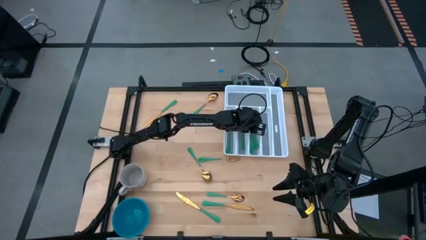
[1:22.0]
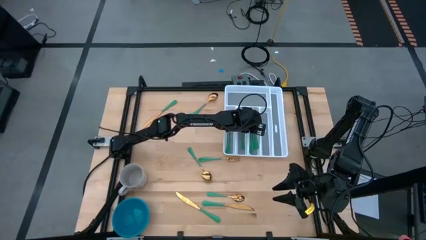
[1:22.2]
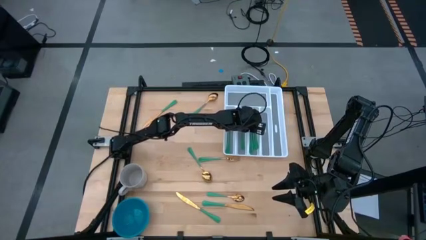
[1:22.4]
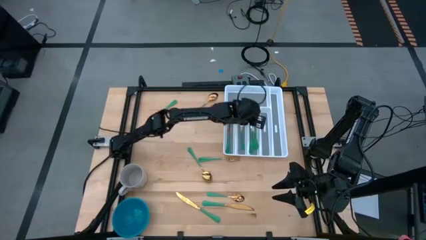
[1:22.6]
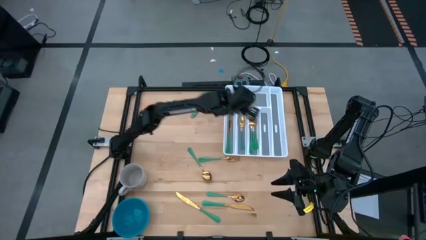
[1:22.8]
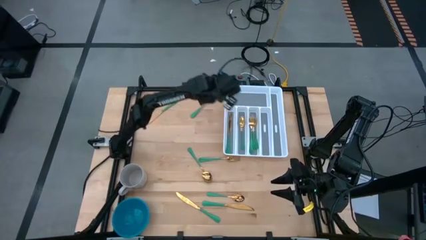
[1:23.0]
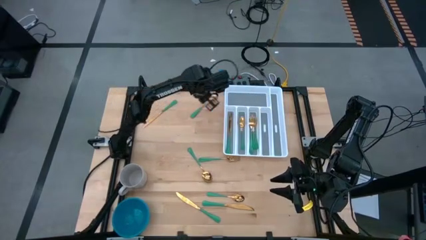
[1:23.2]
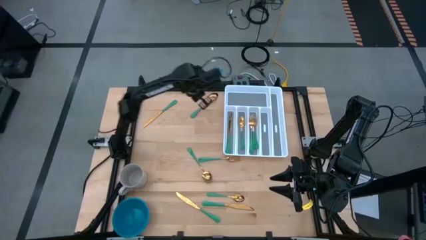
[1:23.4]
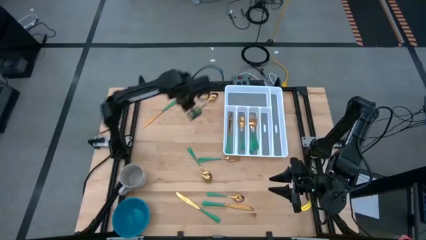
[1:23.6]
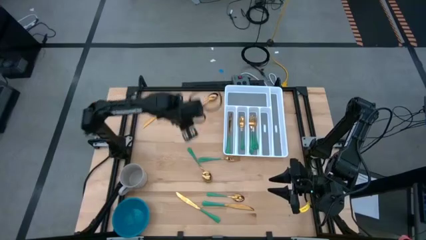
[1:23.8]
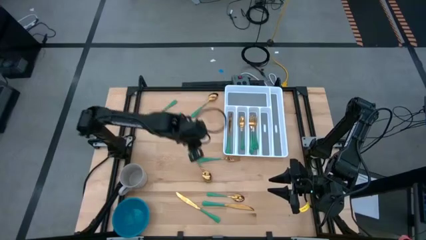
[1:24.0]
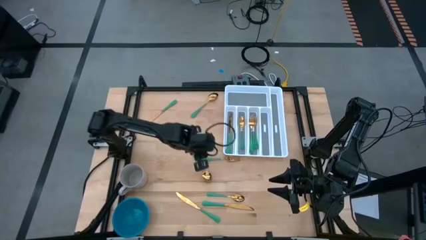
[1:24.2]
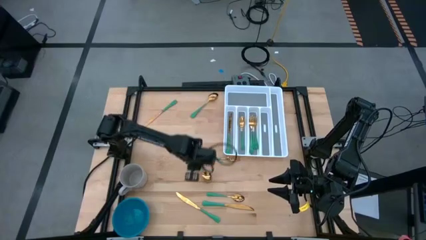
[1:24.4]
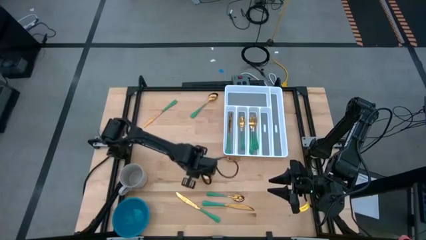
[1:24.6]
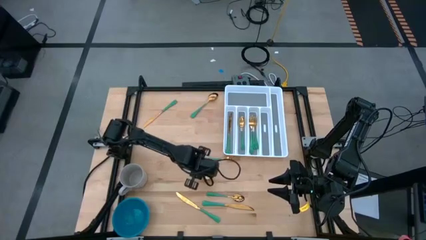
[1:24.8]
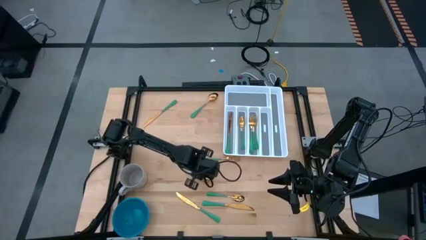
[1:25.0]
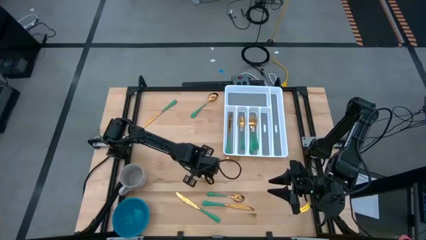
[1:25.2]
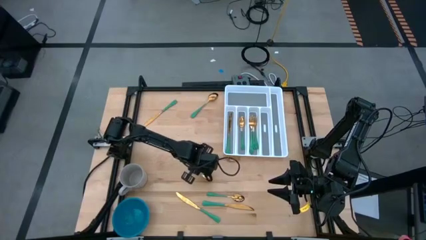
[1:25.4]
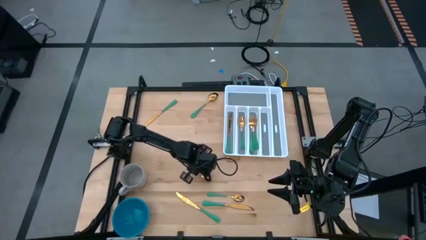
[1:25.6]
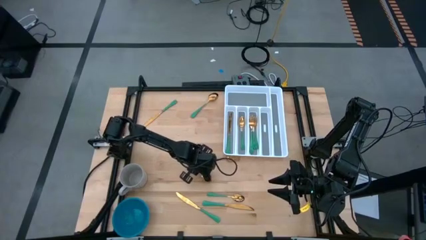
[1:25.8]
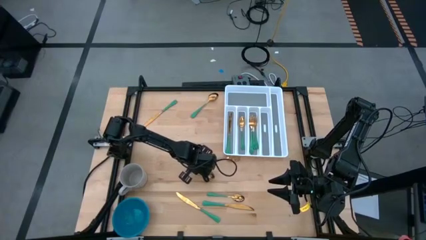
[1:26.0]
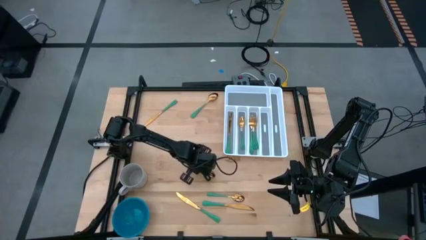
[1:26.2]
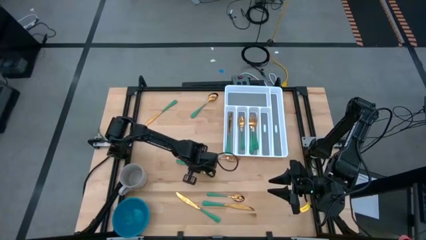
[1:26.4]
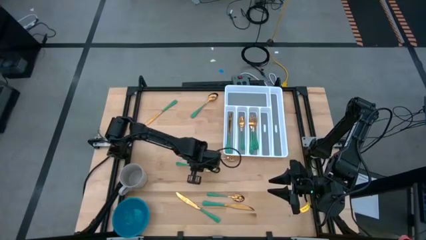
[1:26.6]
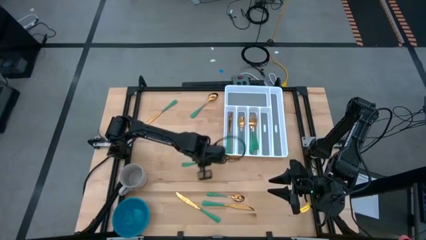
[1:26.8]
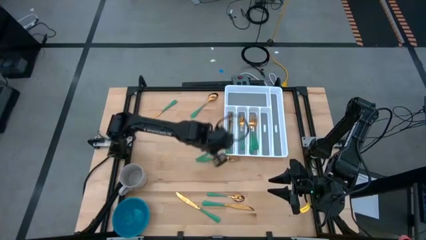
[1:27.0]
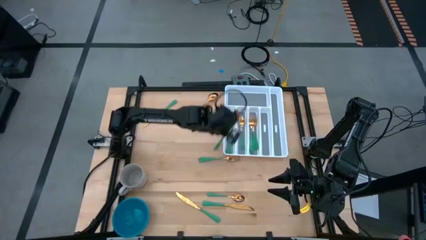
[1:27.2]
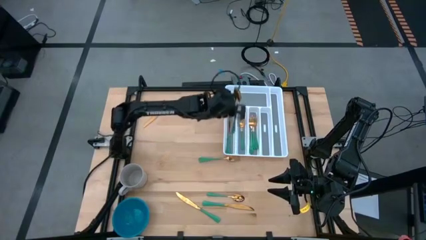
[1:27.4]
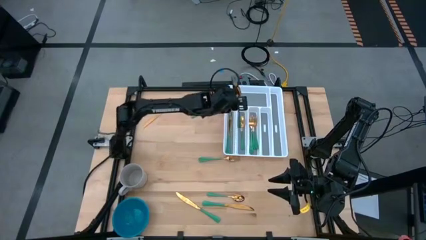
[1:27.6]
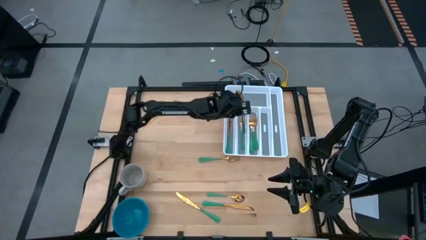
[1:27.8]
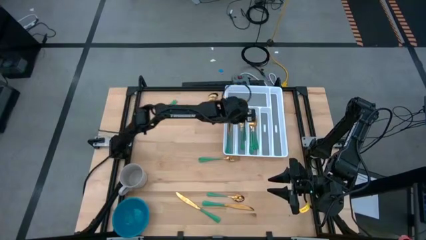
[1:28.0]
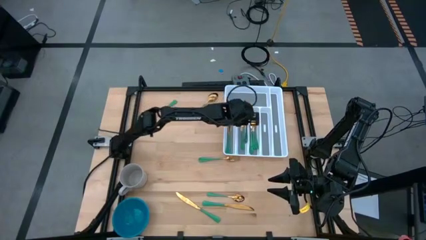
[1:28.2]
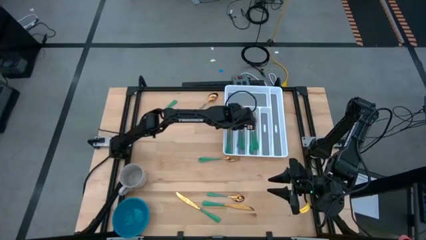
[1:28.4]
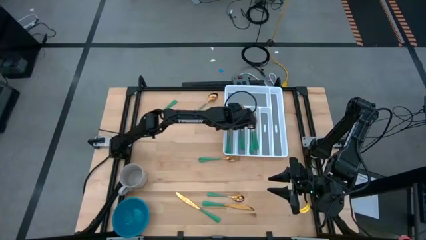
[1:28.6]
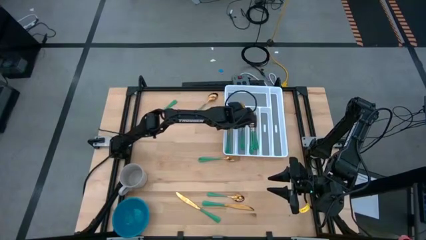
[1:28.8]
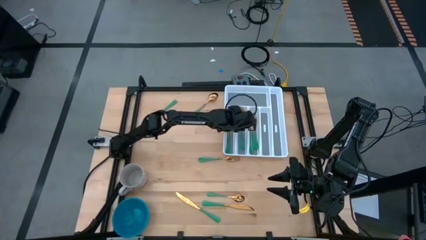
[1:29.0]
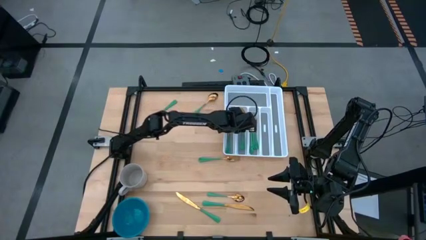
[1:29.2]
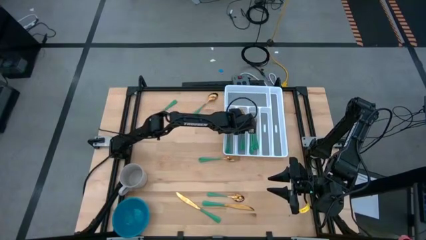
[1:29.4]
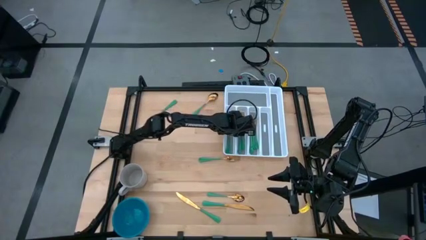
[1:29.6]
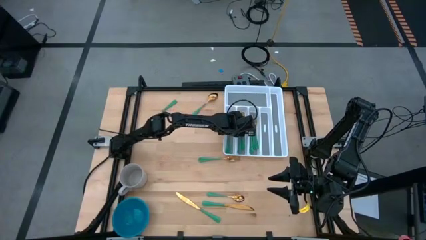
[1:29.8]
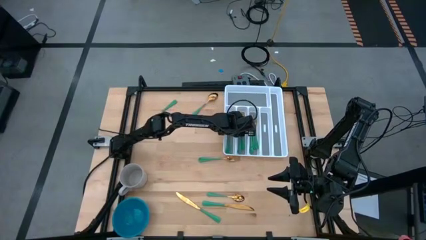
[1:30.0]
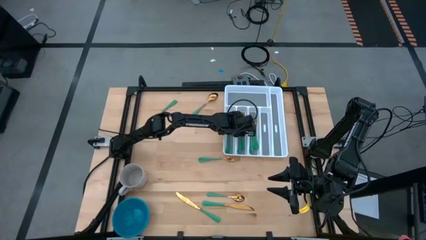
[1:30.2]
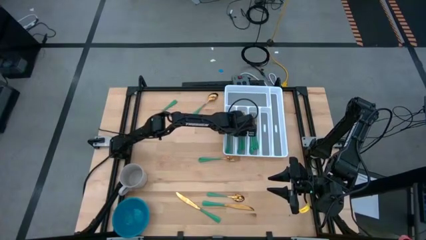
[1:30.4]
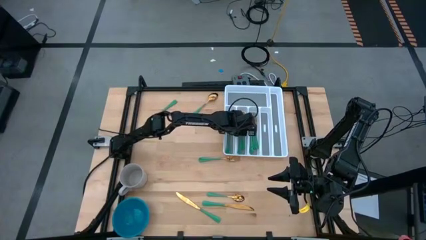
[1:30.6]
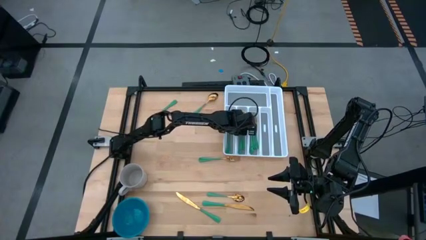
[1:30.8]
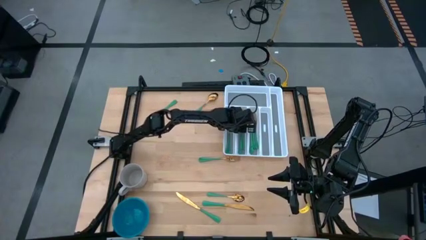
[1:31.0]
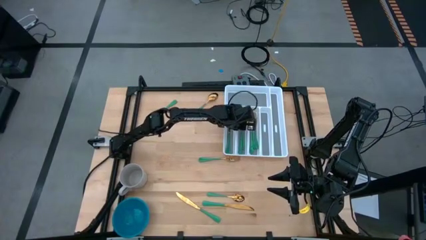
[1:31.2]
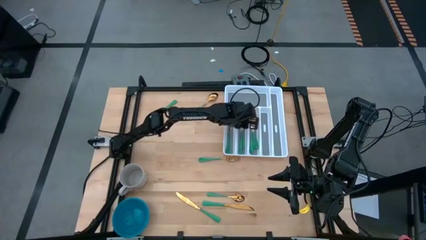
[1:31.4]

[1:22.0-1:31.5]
Task: Sort silverware
Put the middle green spoon into the white cutlery tray

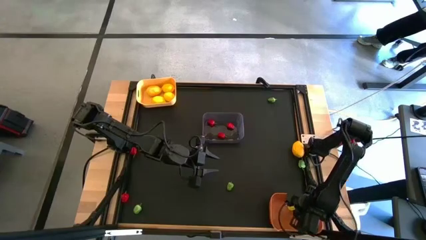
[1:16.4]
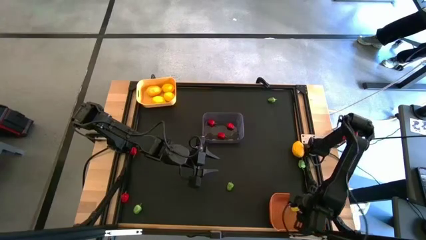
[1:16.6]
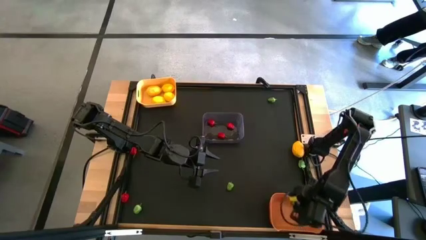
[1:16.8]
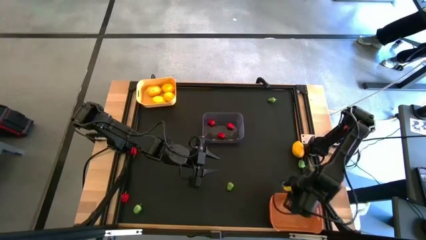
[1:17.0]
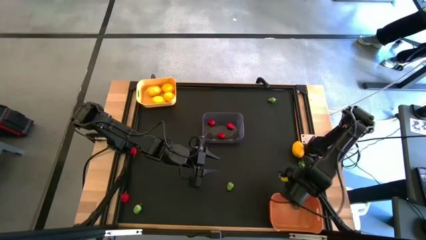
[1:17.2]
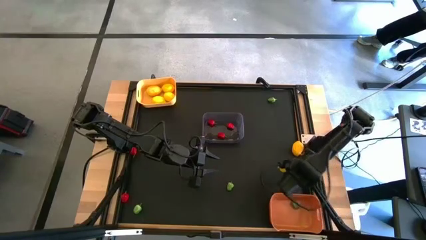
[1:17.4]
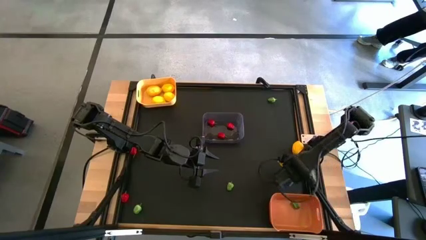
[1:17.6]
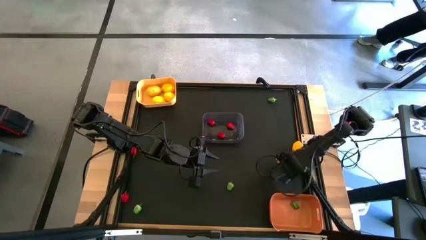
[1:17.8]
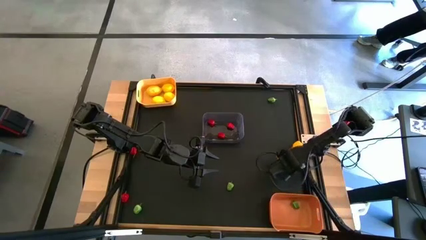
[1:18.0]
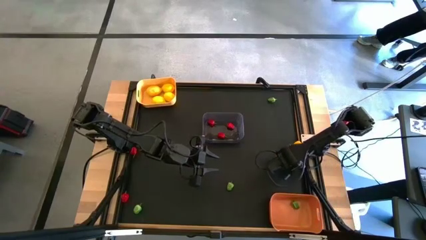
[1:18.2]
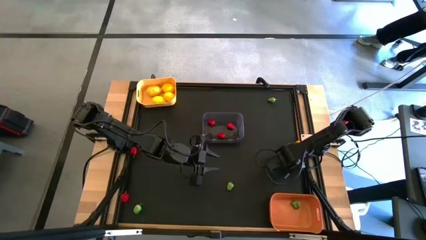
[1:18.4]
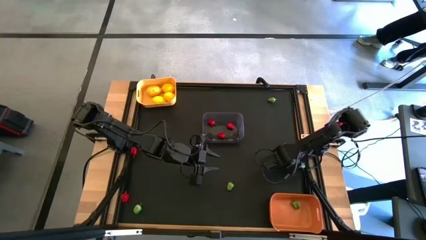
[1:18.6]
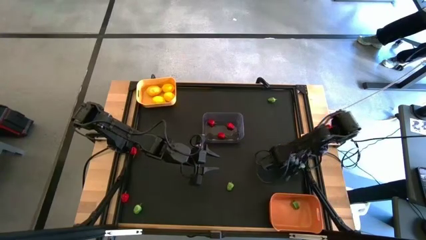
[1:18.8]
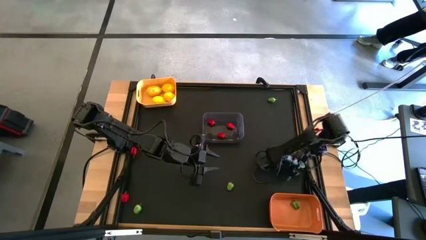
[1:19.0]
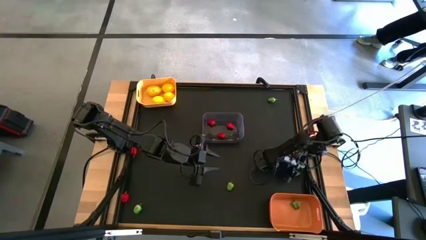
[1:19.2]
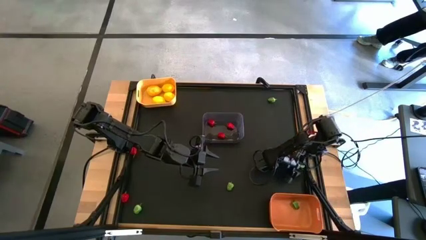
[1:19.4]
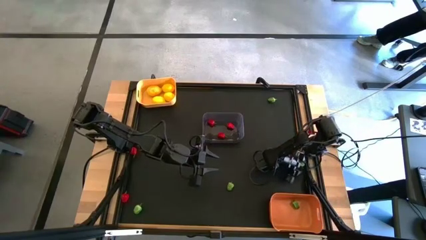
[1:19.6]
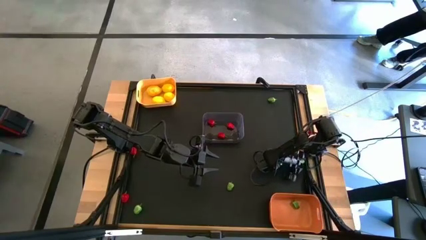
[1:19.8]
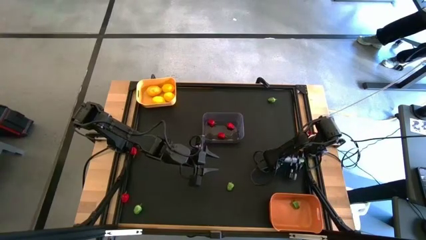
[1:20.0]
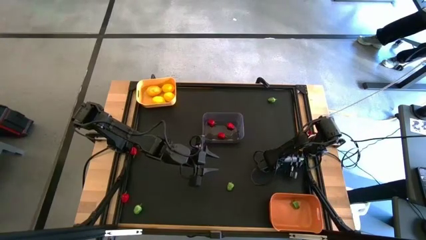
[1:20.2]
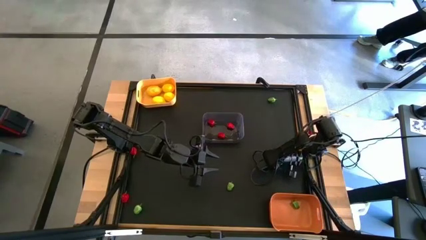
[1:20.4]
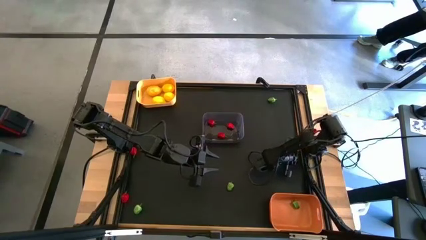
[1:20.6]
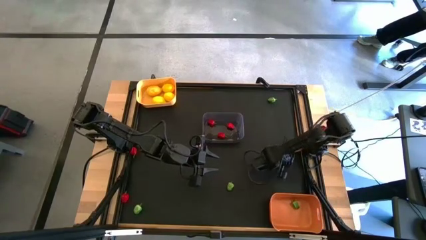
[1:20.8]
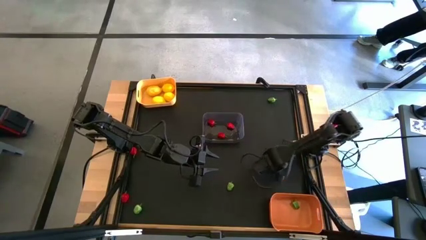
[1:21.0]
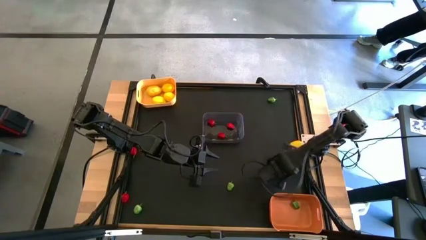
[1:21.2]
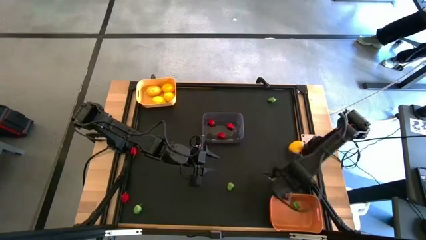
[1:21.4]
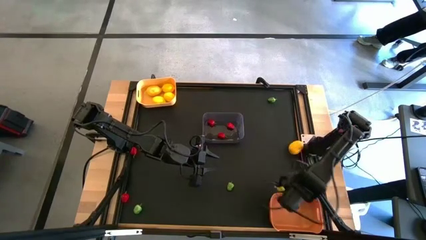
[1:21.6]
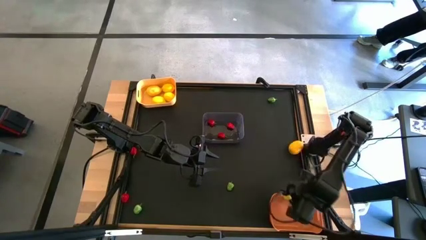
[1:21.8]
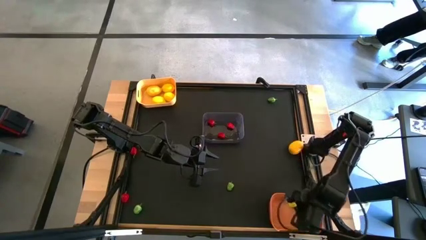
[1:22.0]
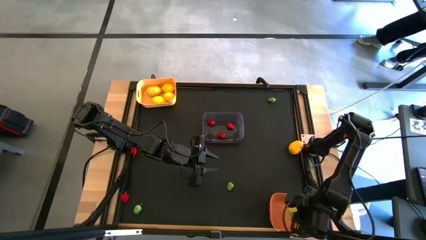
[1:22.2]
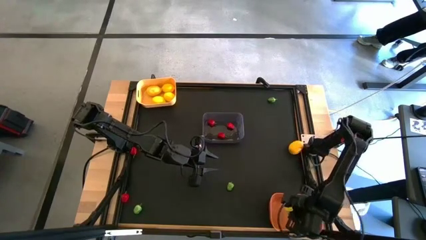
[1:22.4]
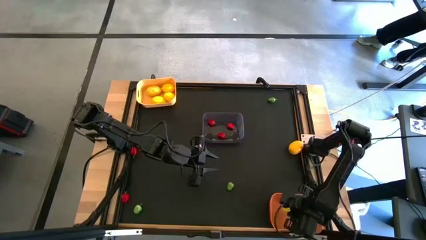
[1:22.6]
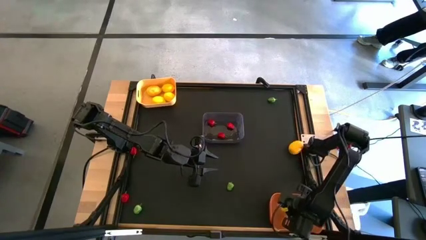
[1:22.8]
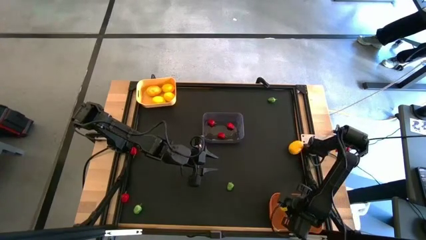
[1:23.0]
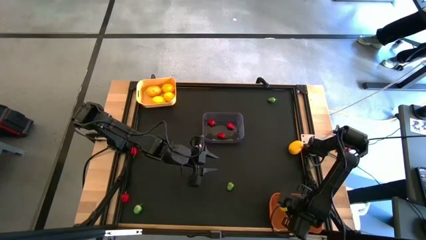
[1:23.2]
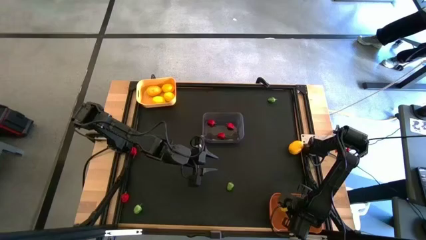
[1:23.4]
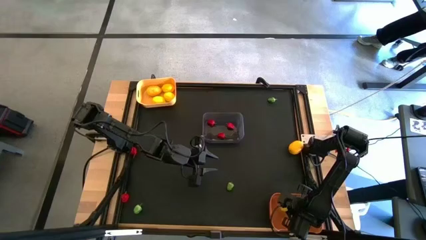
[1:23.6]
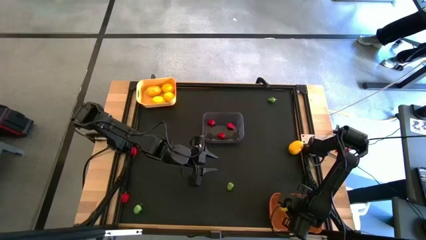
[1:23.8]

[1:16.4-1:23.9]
Task: Sort produce into baskets
Put the green bell pepper into the orange bin
